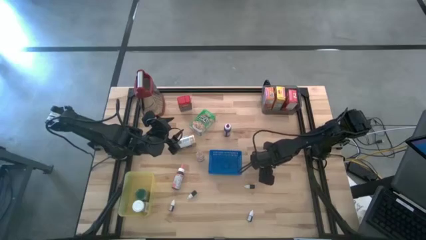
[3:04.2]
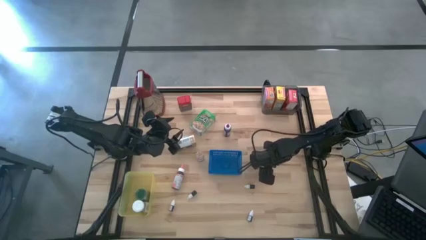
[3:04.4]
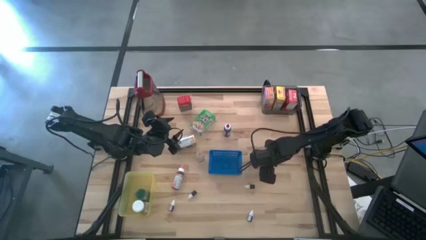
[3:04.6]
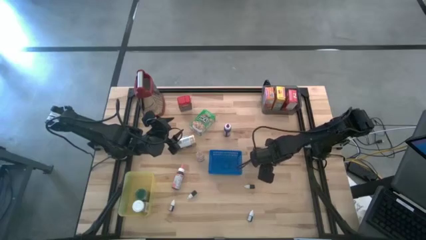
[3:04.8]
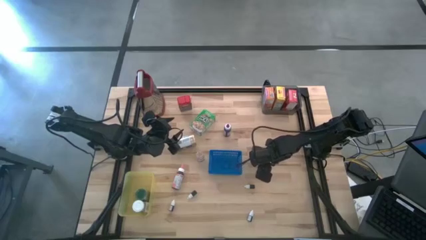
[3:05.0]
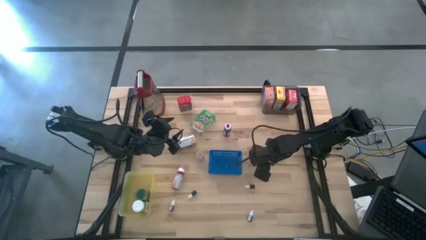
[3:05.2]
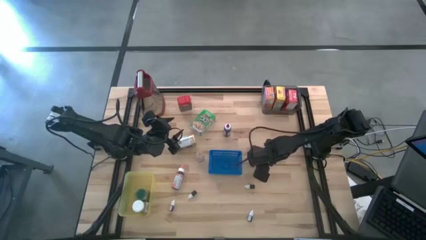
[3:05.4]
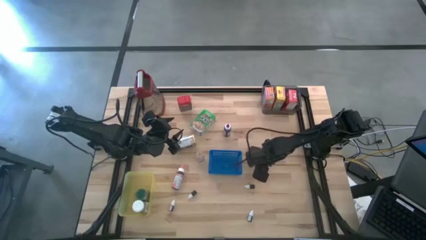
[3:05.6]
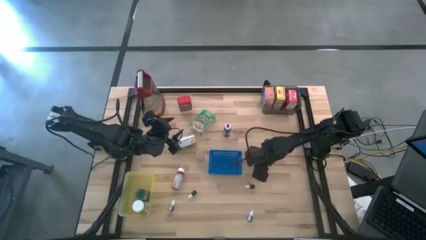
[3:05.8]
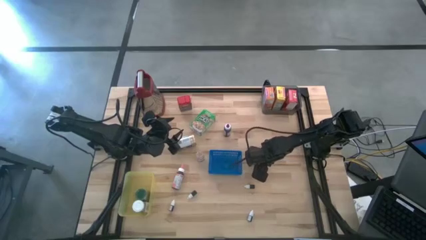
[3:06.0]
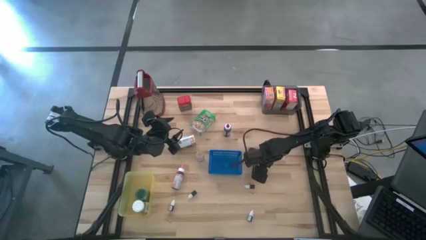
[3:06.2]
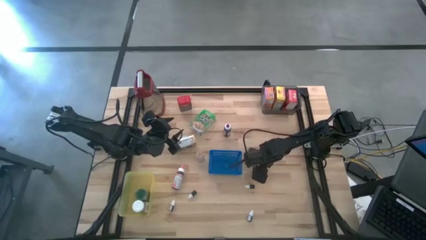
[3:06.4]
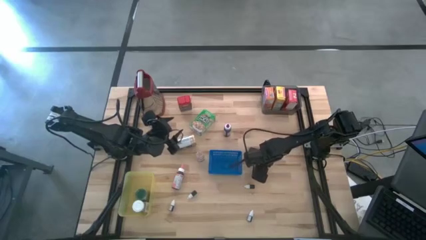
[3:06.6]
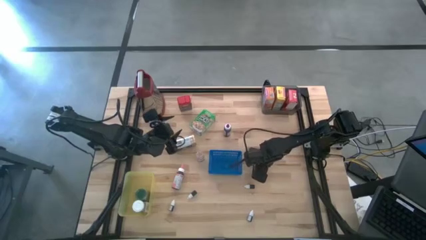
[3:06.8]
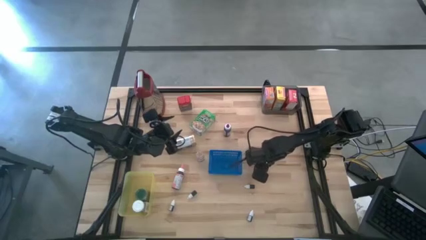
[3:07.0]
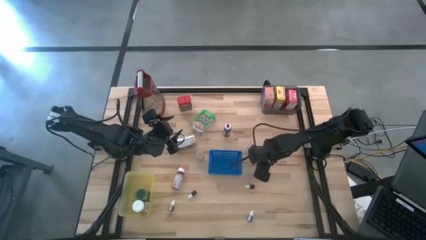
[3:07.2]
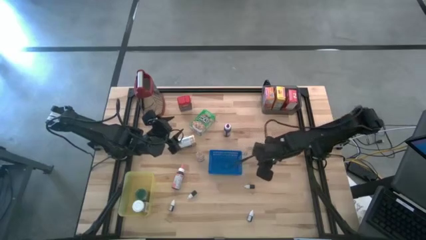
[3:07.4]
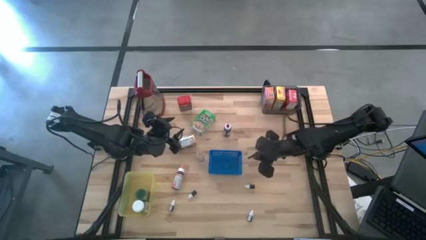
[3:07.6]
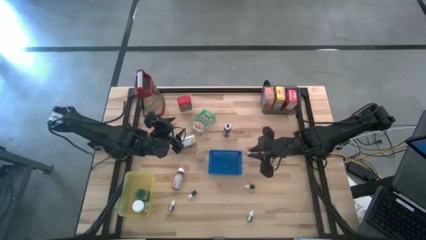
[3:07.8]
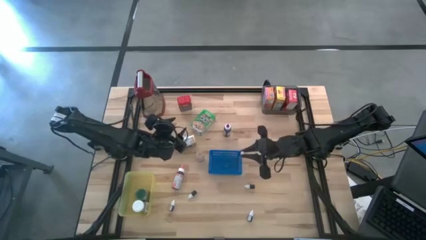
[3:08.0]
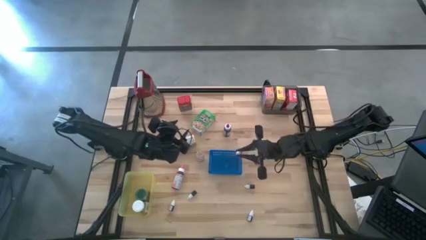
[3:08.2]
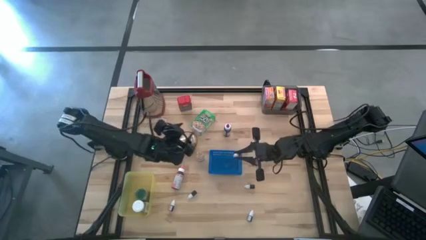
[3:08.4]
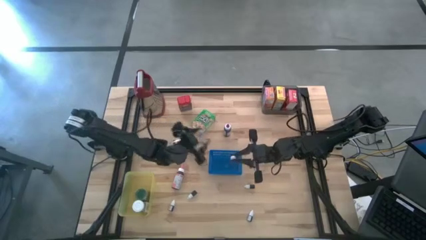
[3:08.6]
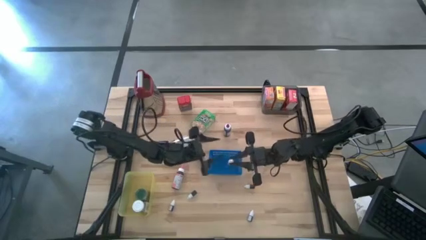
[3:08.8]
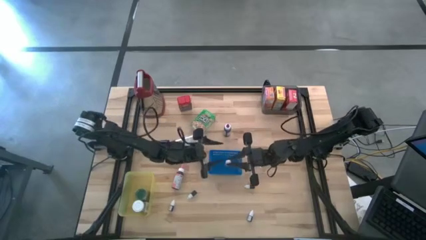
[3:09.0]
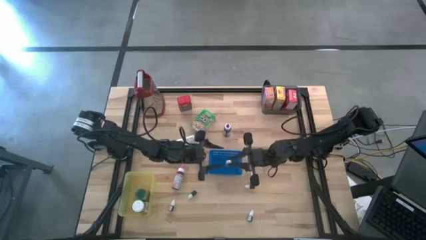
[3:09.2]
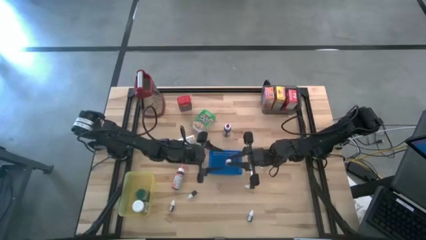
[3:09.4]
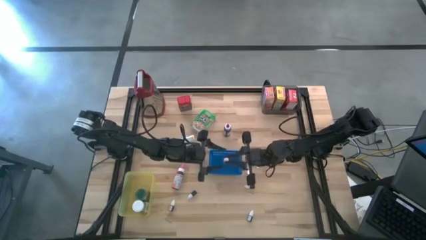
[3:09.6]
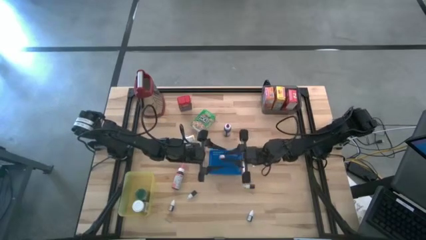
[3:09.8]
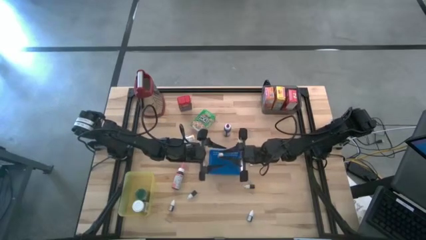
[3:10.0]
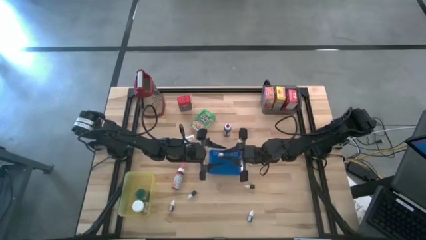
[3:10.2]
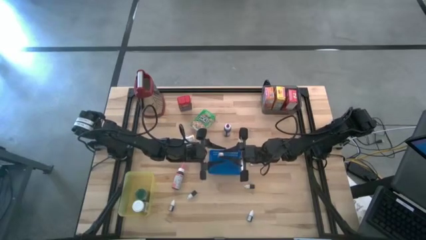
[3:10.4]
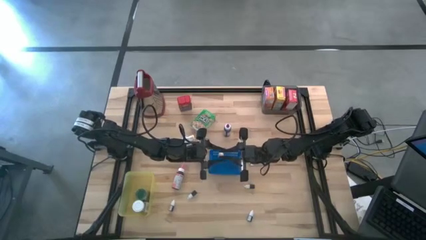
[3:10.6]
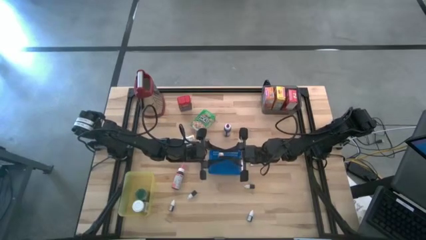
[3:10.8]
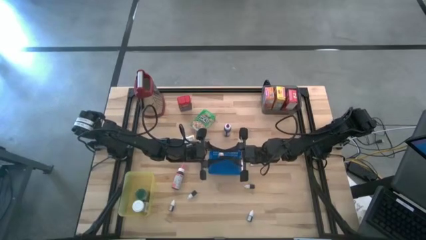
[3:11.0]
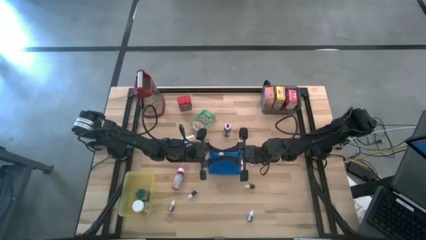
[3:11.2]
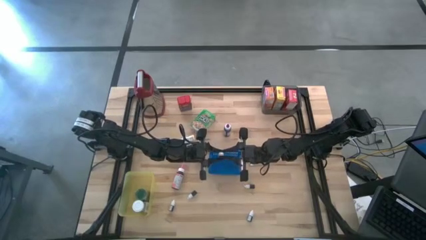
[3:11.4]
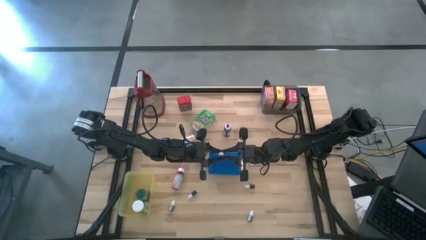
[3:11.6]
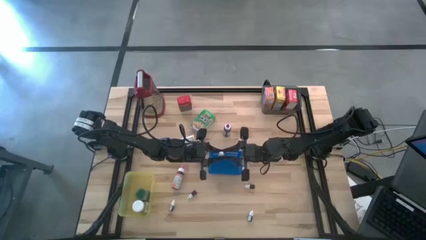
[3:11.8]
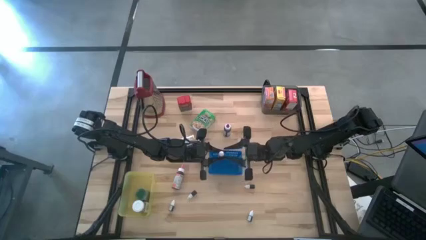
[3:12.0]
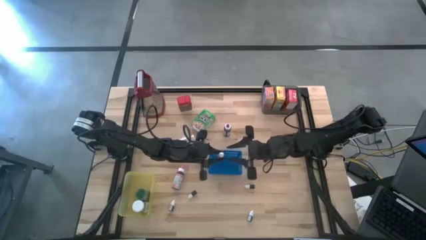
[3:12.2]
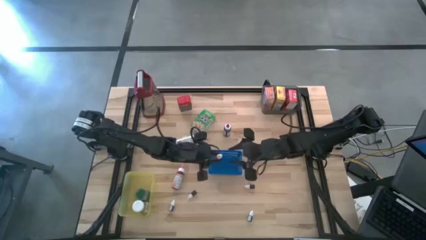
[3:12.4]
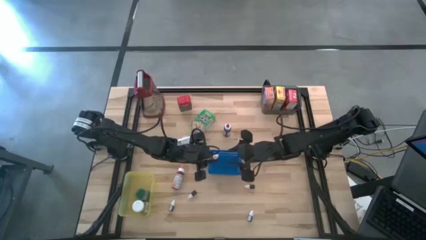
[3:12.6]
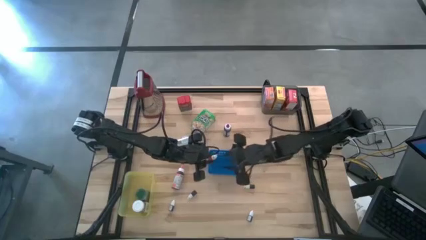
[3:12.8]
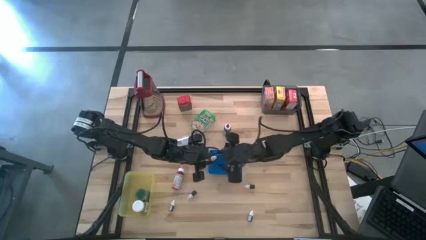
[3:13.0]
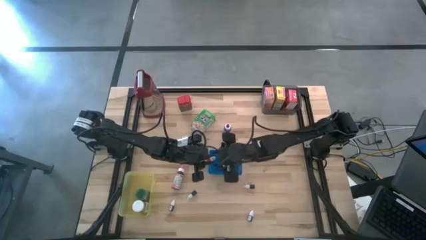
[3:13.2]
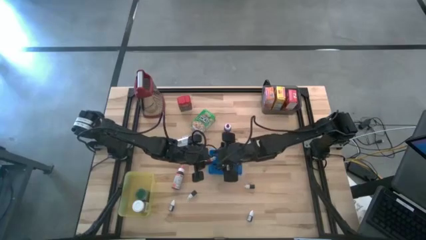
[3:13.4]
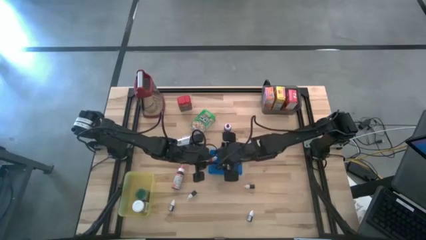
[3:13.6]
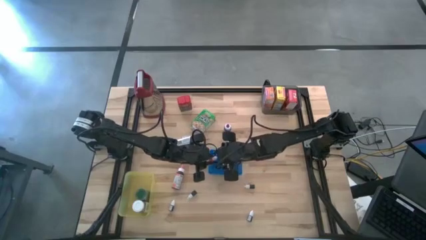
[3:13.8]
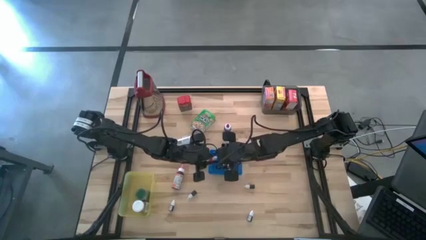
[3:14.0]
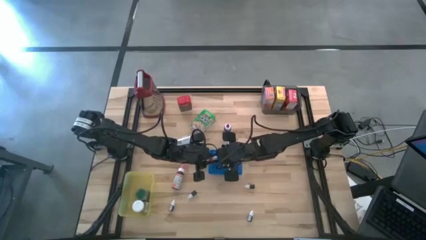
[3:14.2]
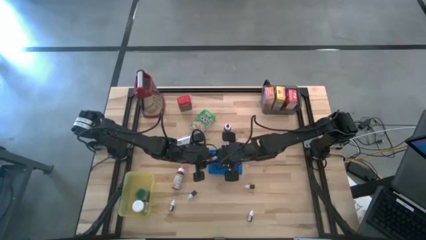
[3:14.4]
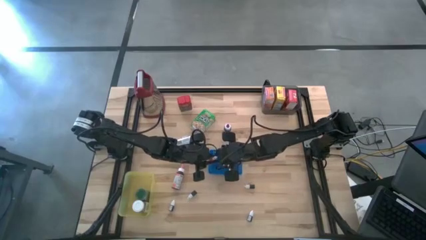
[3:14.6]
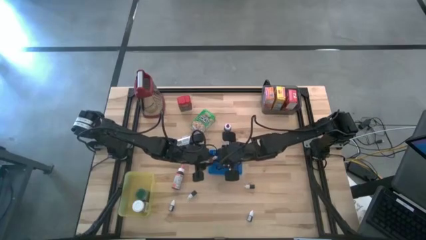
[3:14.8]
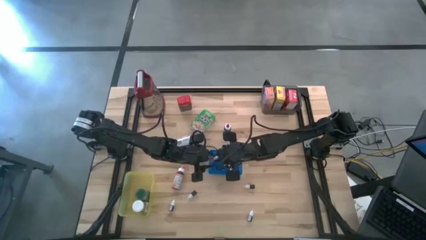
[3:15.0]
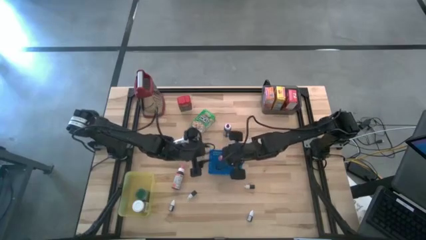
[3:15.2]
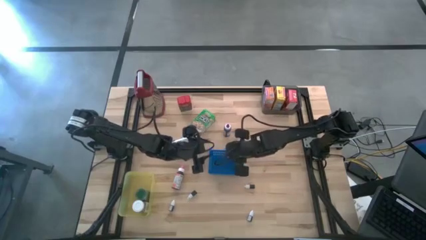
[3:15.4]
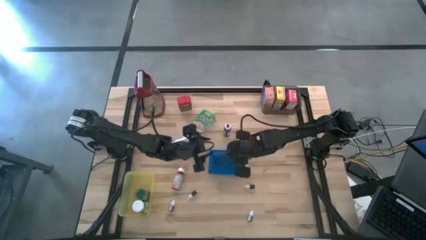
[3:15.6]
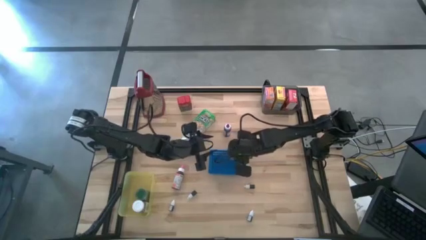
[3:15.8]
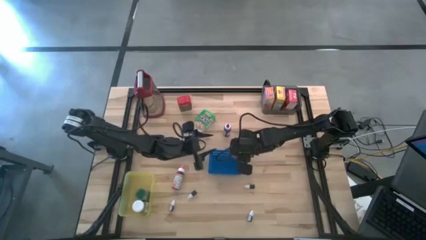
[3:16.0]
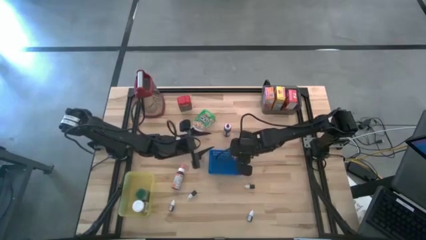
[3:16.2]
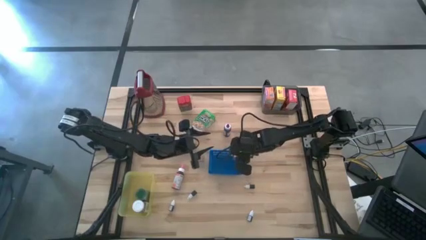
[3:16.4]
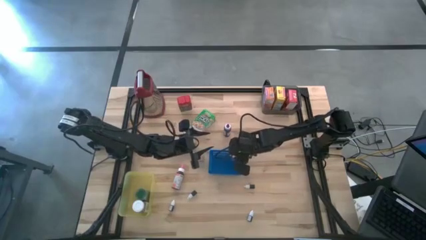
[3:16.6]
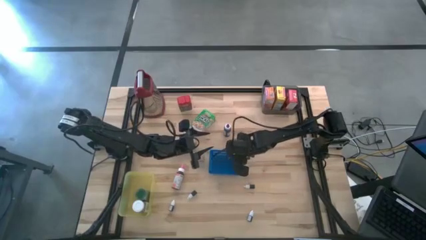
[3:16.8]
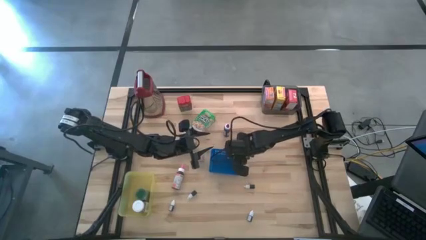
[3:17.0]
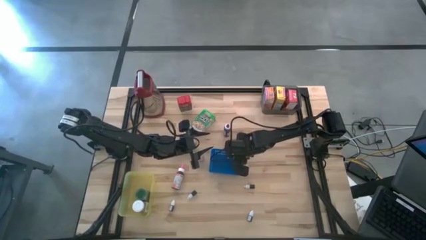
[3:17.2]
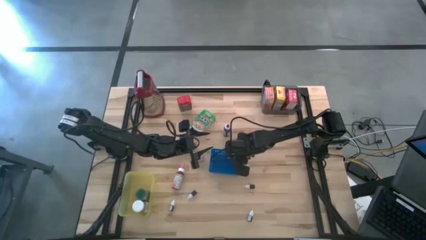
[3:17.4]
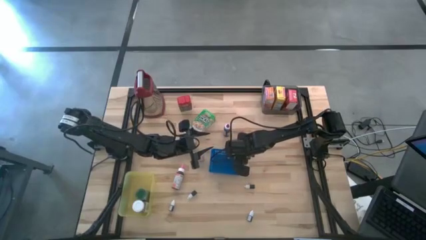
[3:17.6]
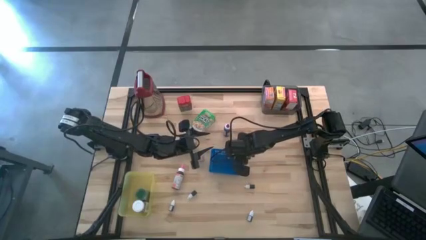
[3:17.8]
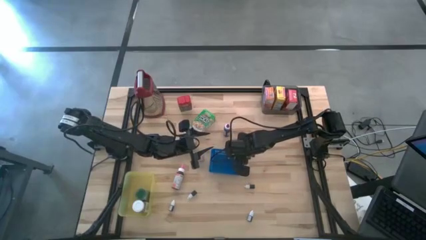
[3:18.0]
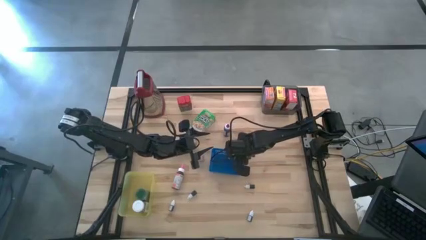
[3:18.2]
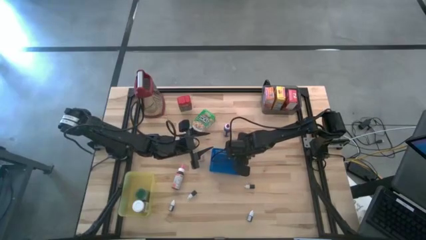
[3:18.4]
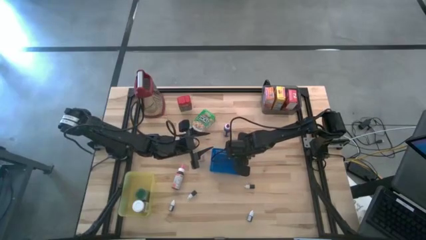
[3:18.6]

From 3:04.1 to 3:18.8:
Task: Pick & Place Kitchen Items
Put the small yellow food coloring bottle into the blue bin
